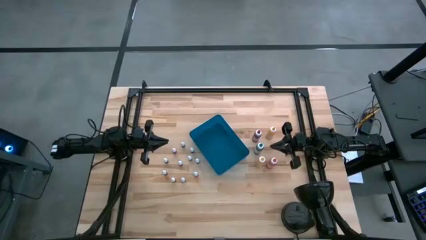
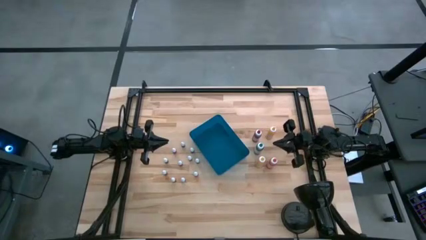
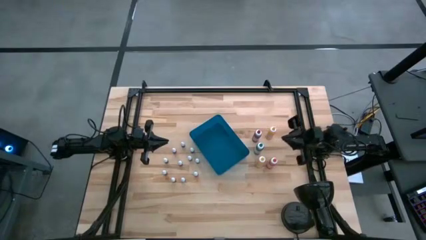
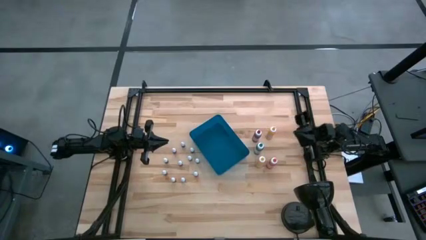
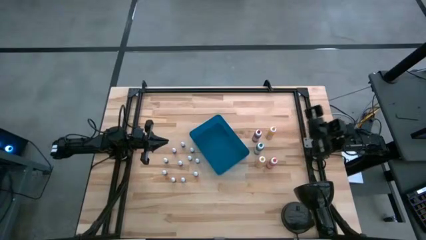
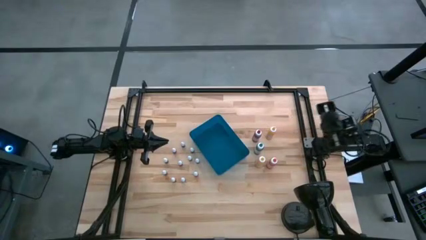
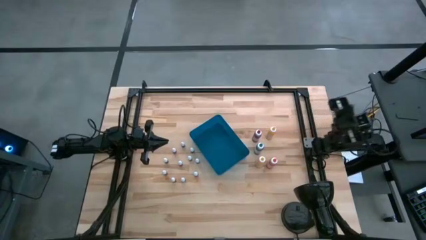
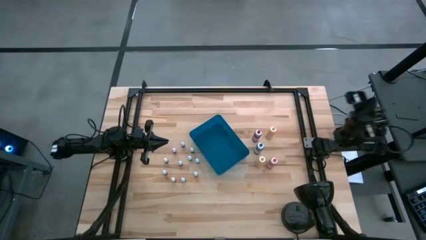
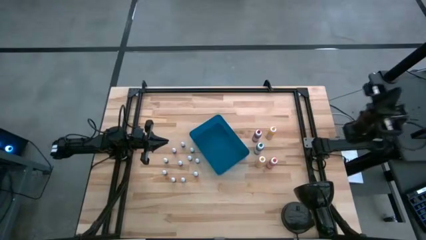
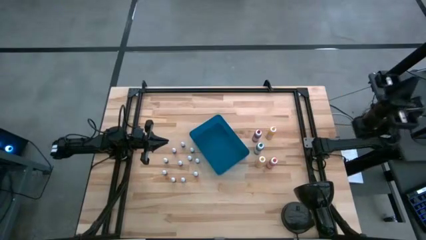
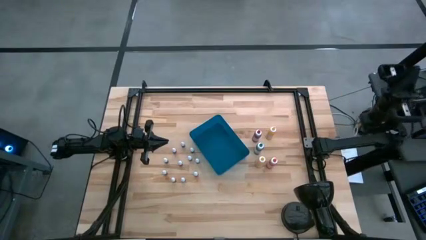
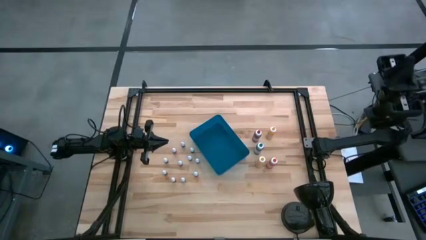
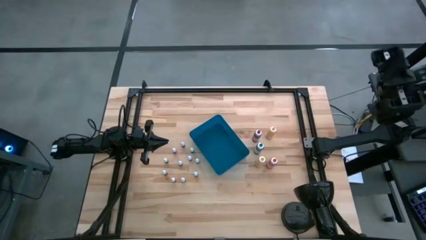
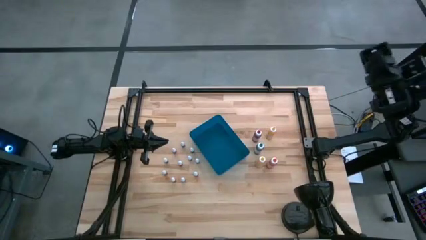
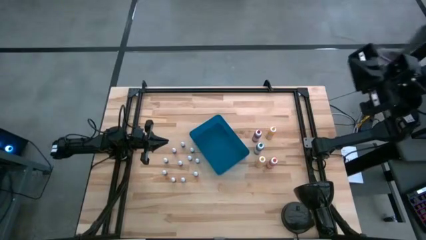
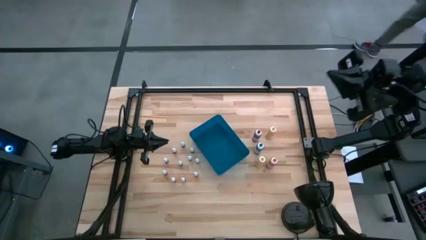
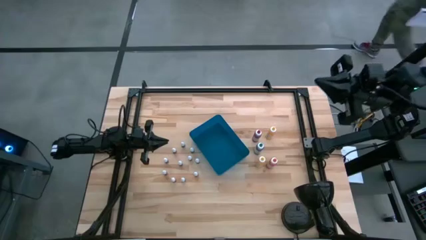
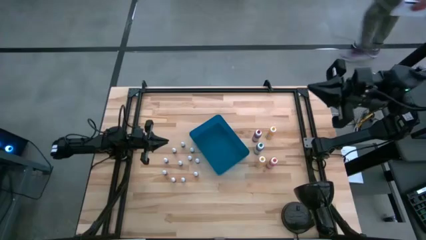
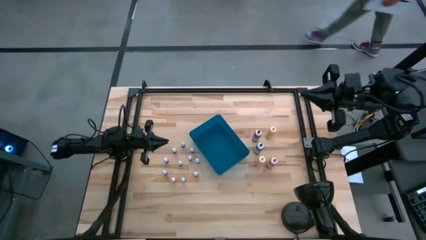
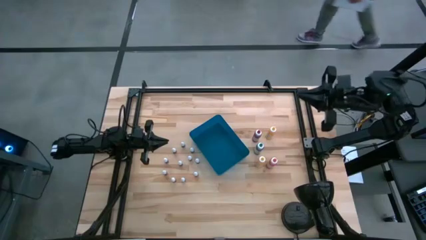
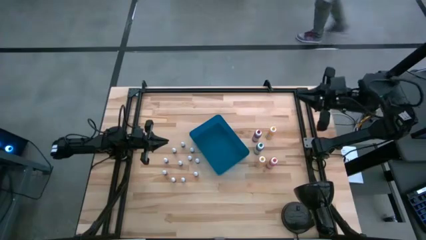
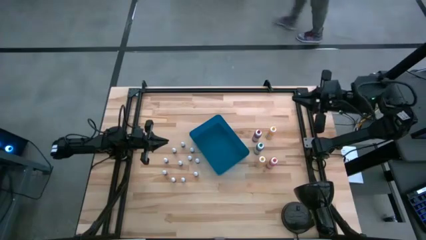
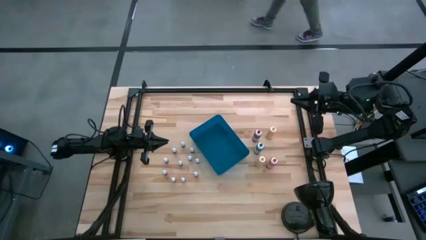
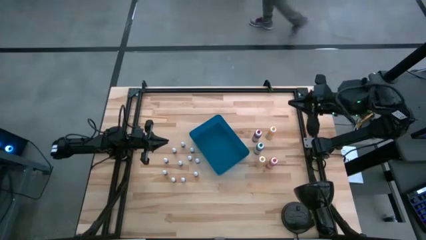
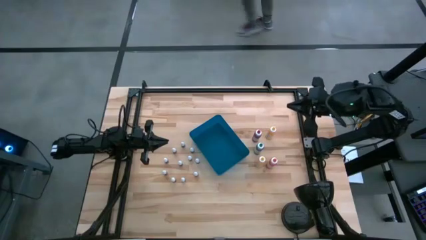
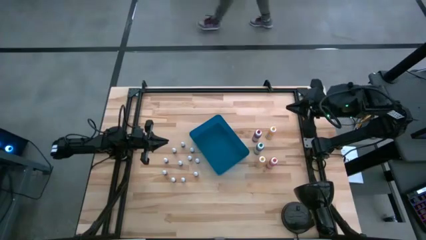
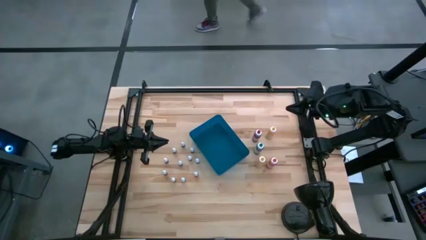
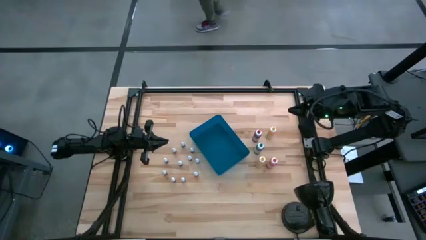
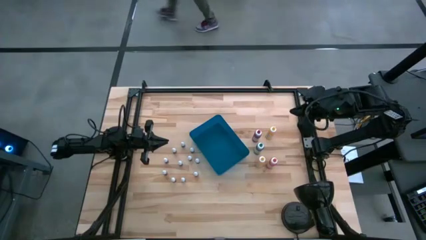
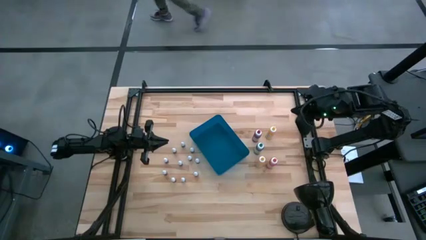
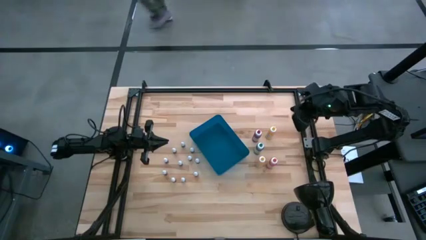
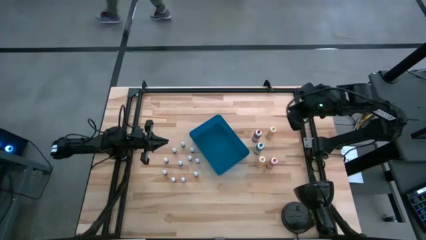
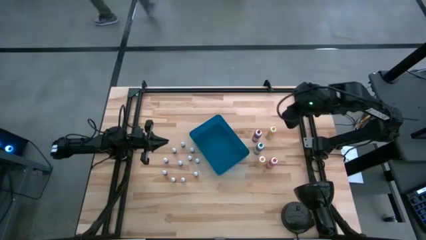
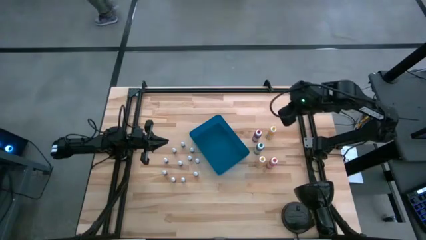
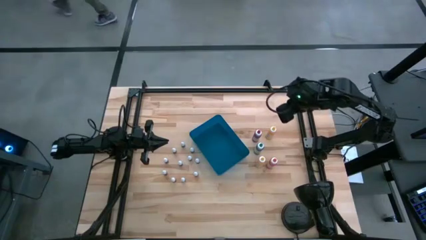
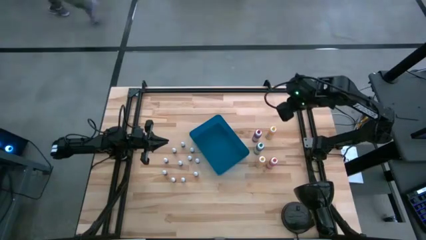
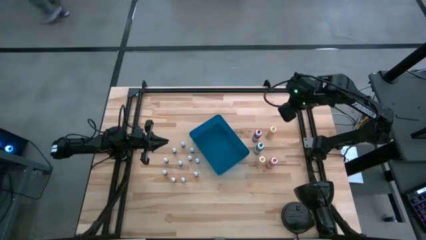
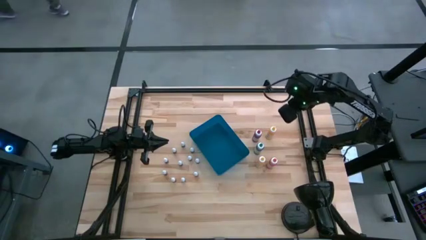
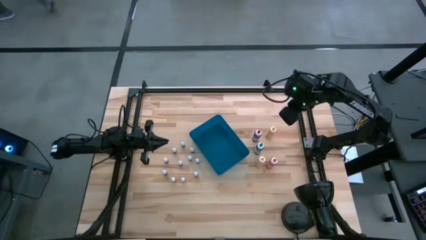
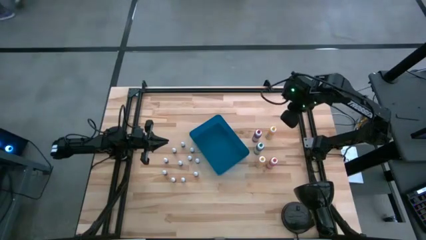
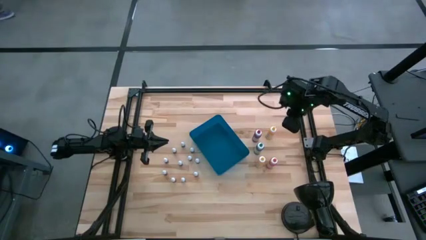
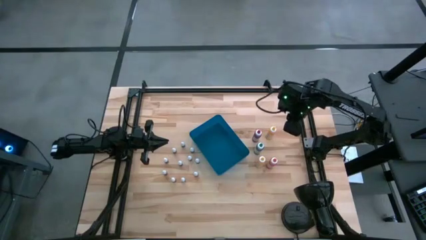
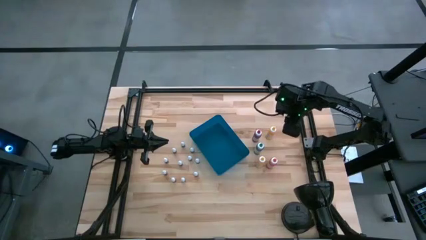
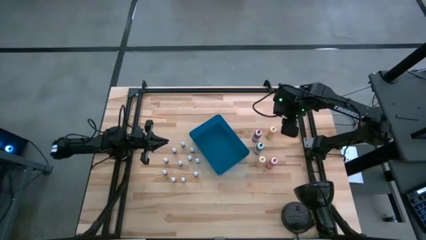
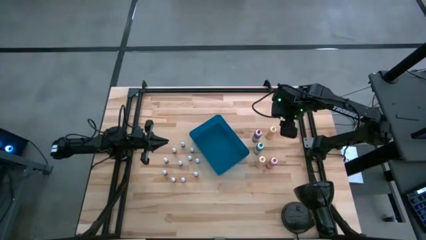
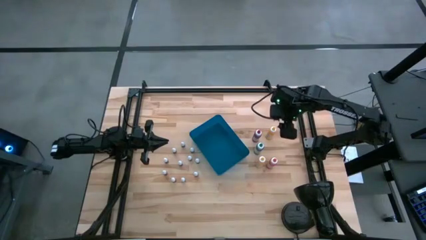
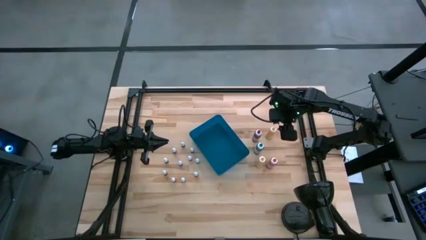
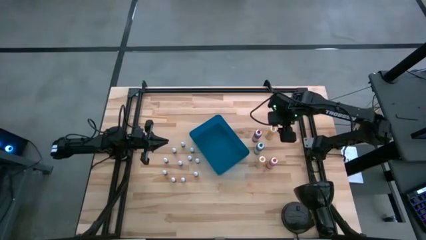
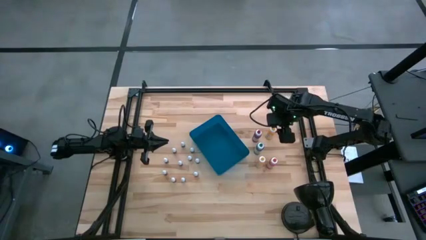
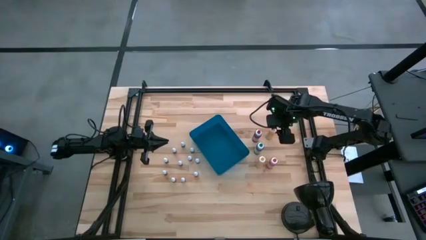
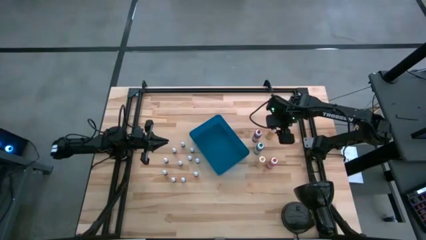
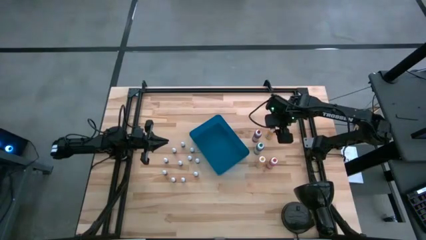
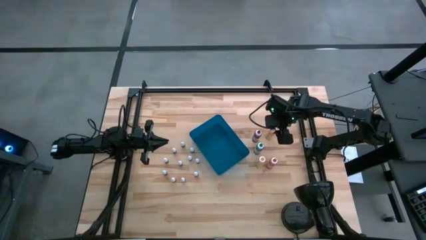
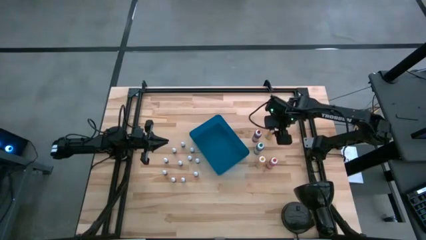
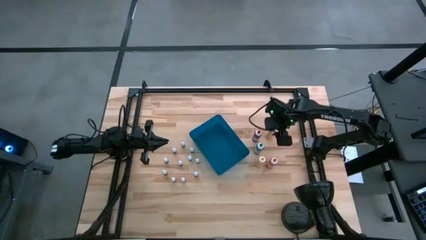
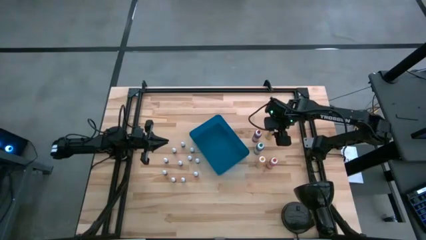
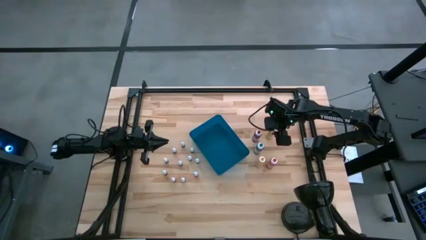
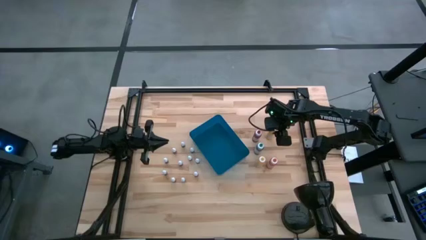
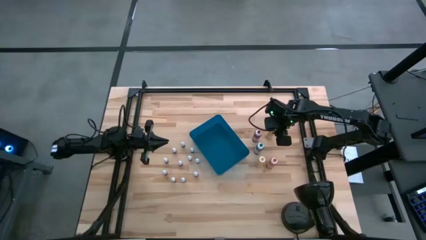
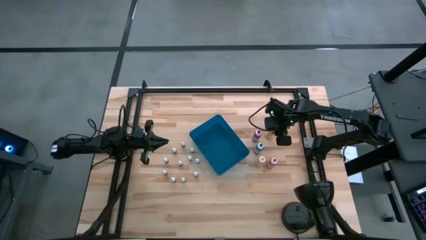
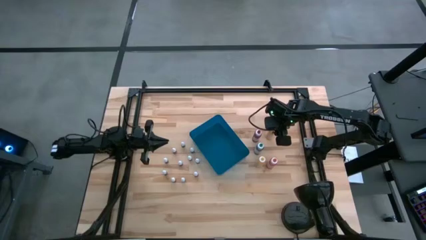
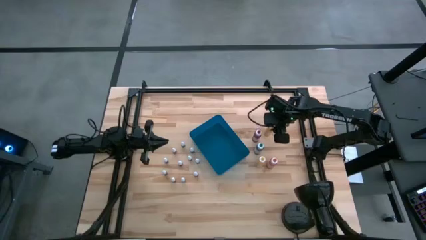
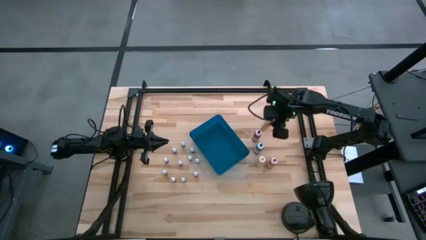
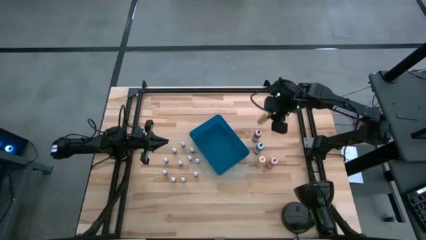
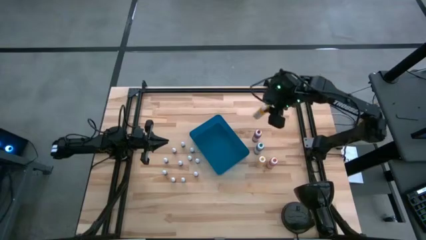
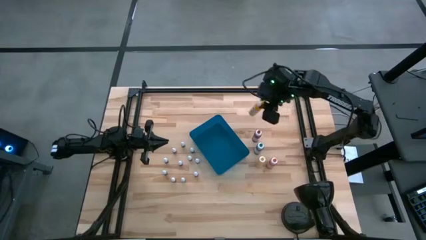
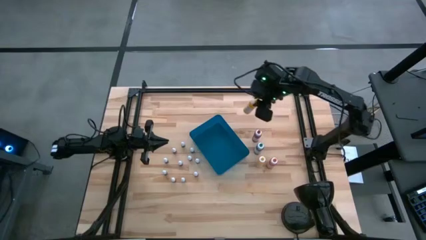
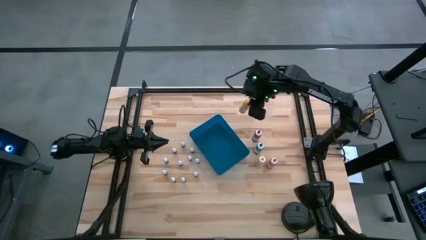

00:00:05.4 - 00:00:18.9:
Task: Pick & Place food coloring
Put the yellow food coloring bottle into the blue bin

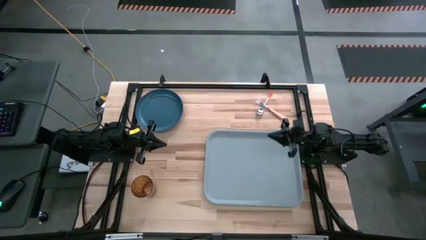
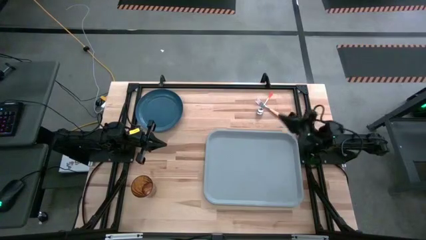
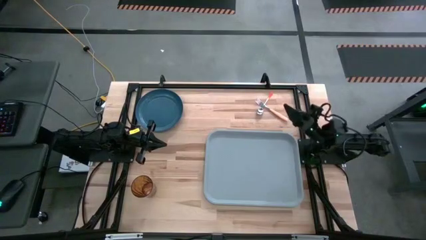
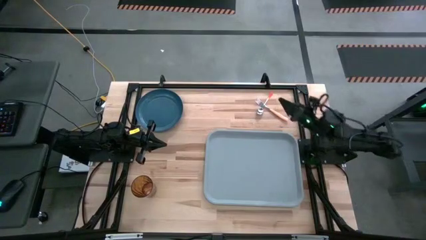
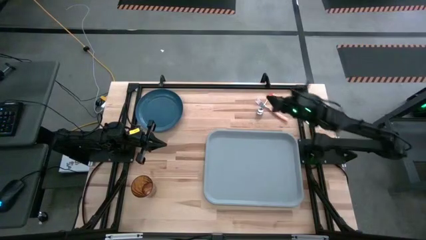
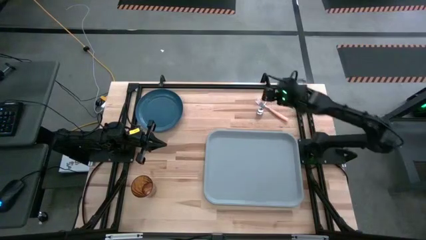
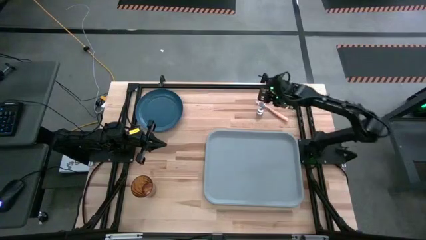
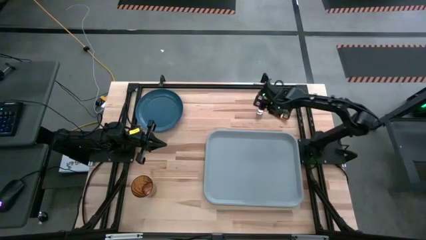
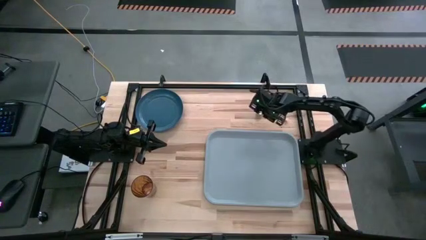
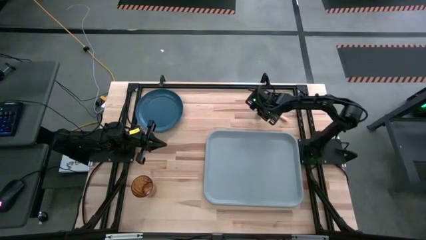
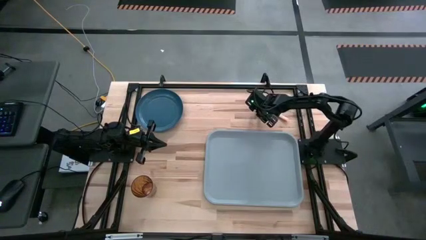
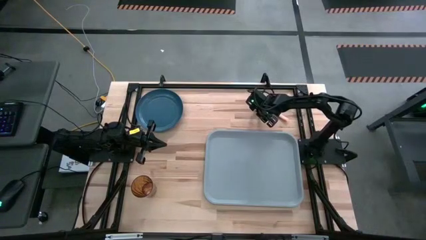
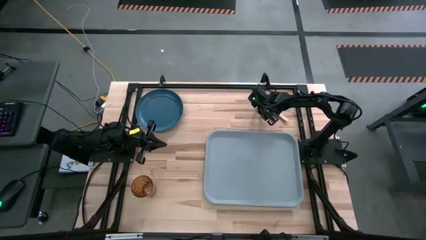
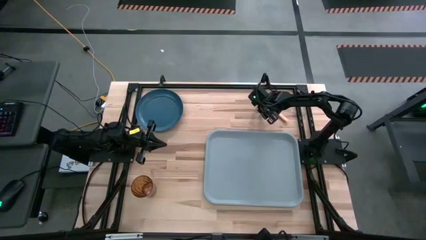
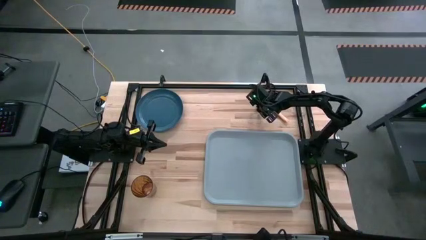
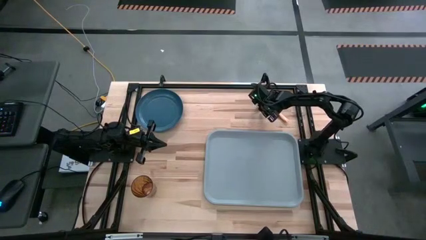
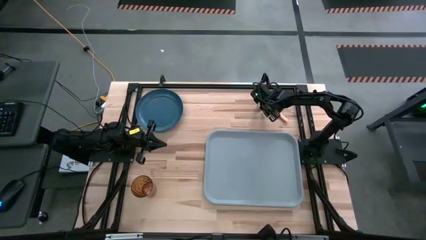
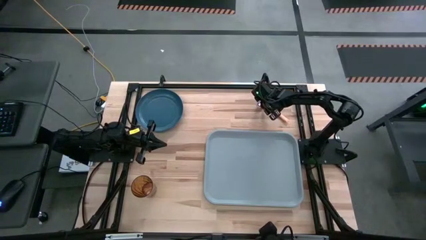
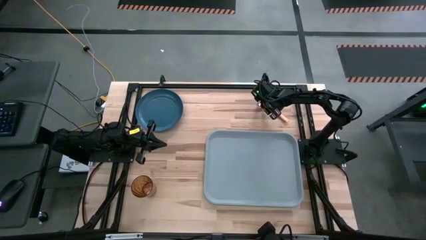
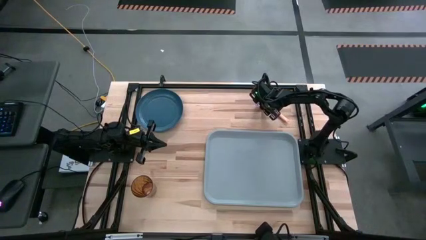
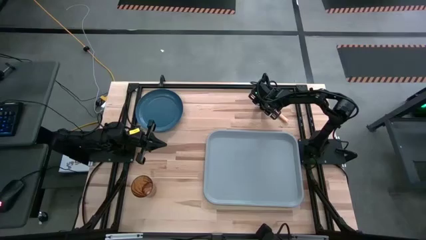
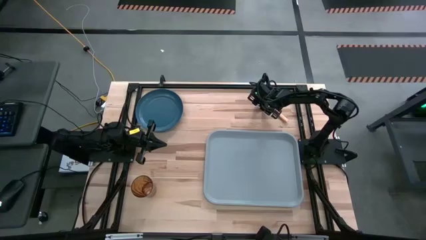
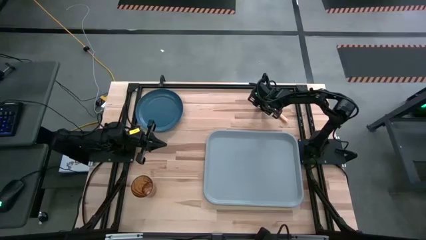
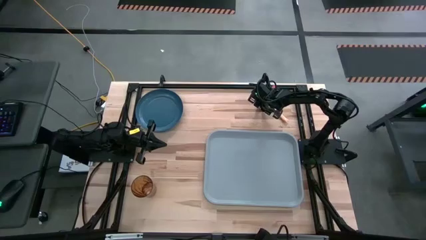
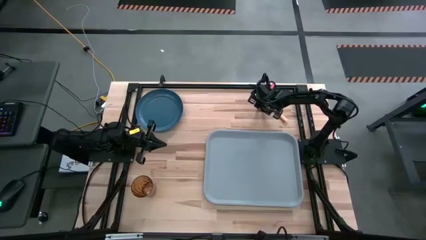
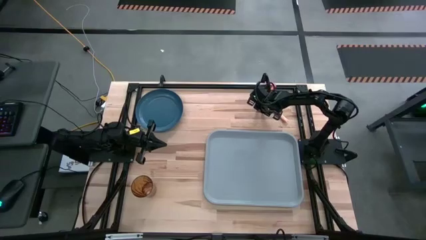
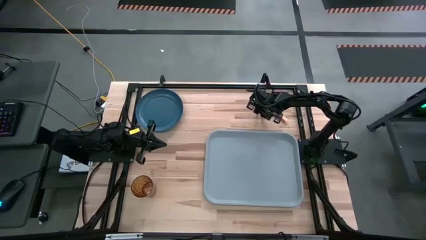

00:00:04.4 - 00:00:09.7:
Task: Pick and place plate/cup/fork/spoon on tray
Put the orange spoon on the gray tray
